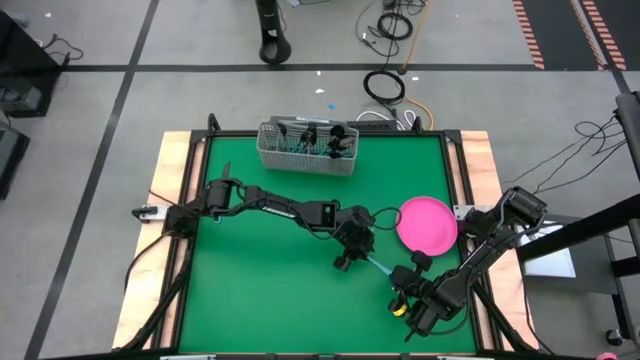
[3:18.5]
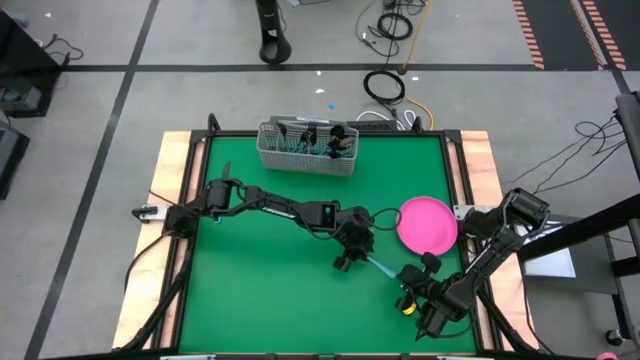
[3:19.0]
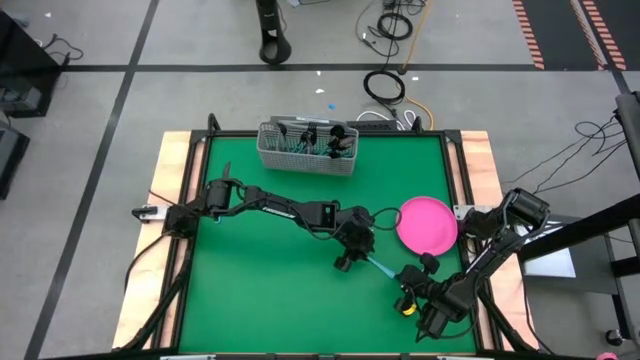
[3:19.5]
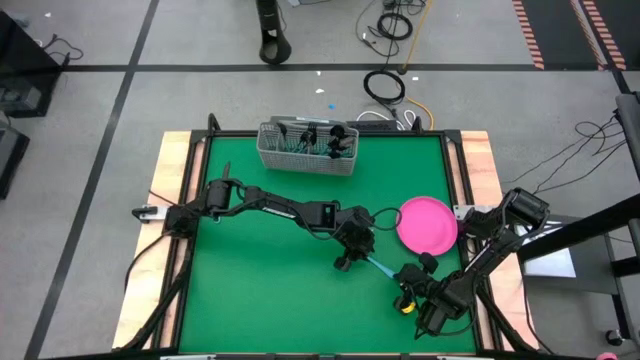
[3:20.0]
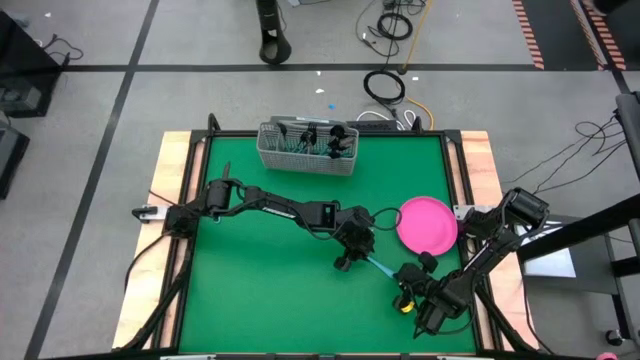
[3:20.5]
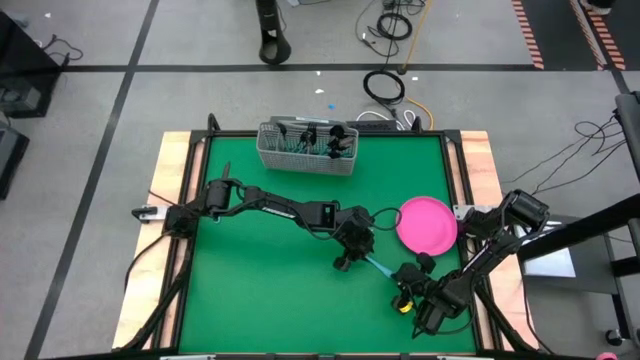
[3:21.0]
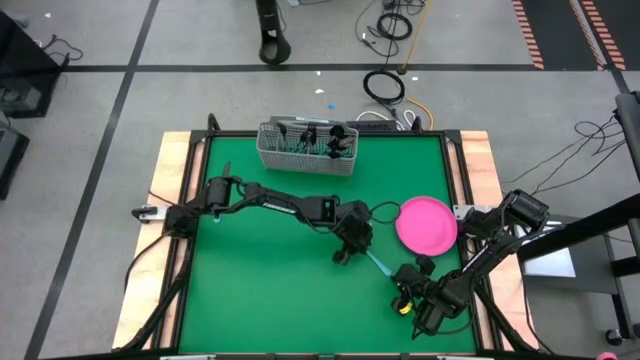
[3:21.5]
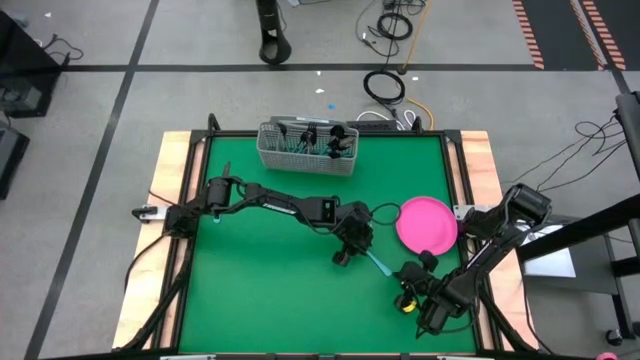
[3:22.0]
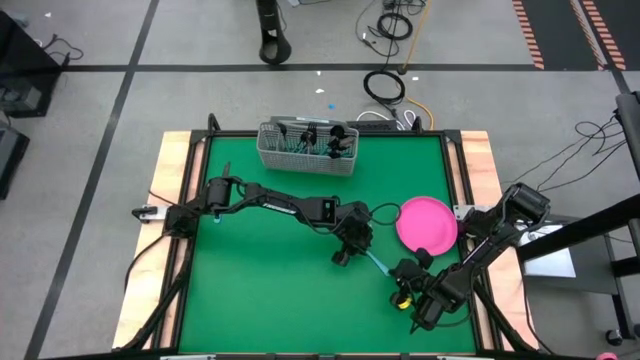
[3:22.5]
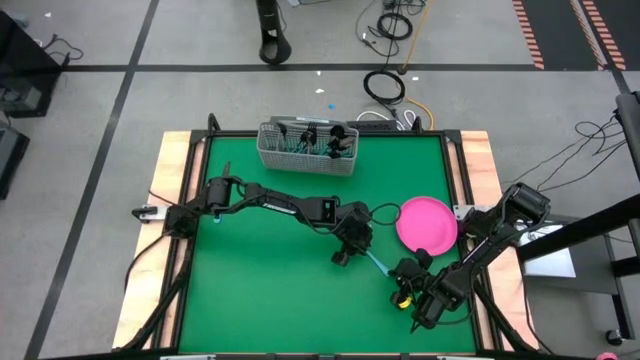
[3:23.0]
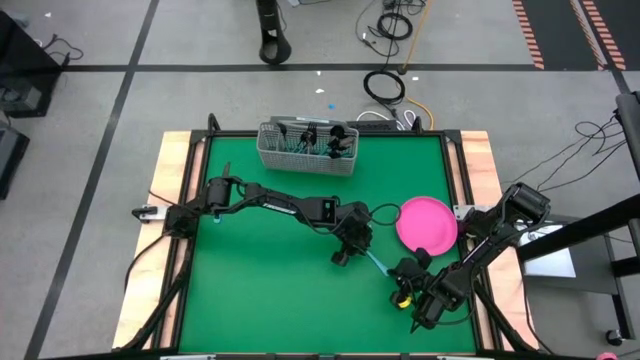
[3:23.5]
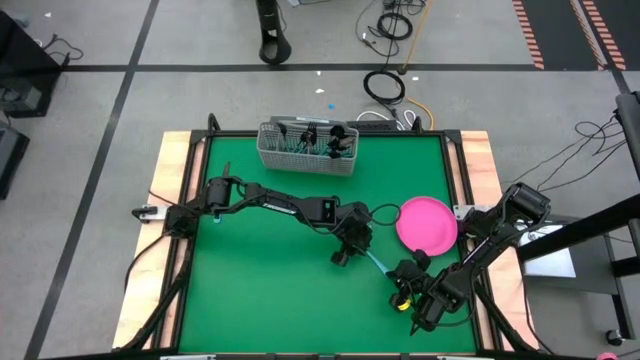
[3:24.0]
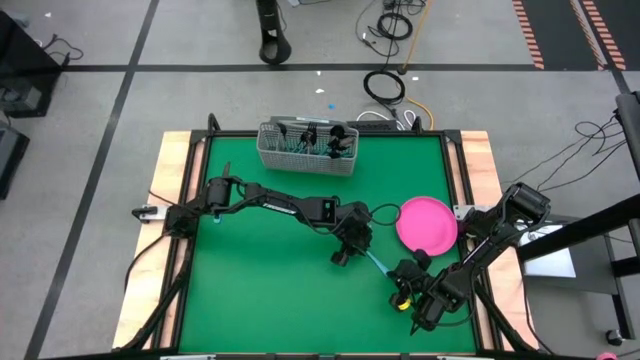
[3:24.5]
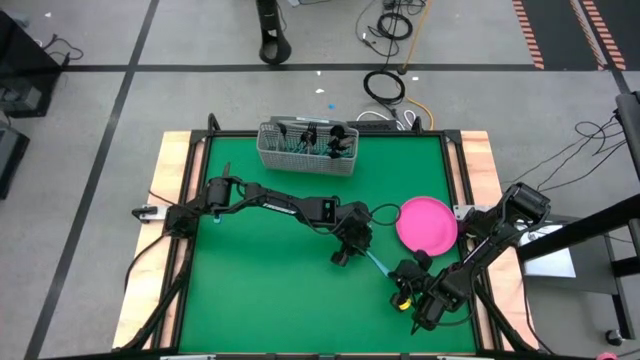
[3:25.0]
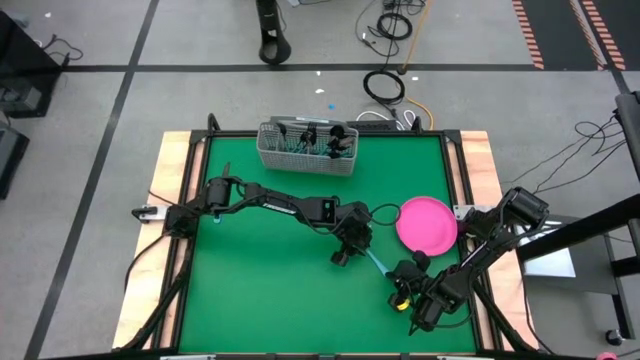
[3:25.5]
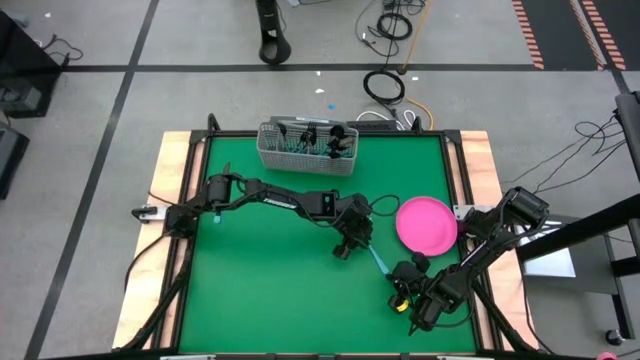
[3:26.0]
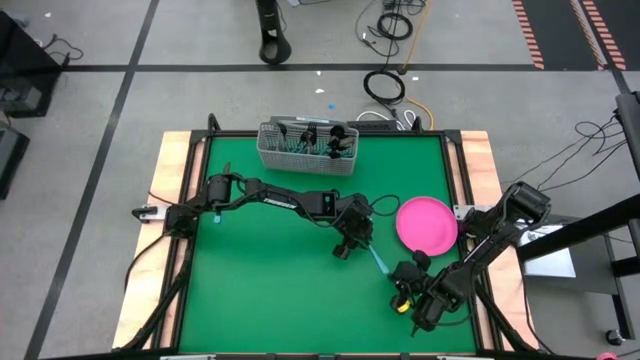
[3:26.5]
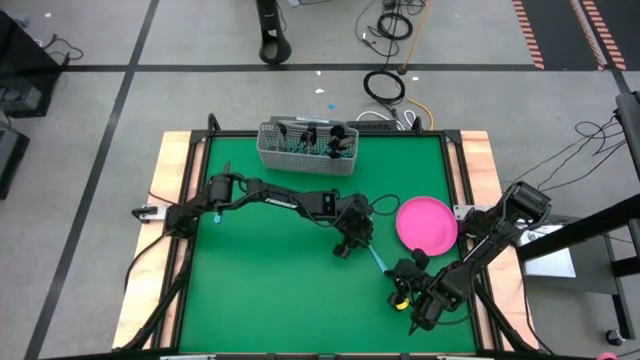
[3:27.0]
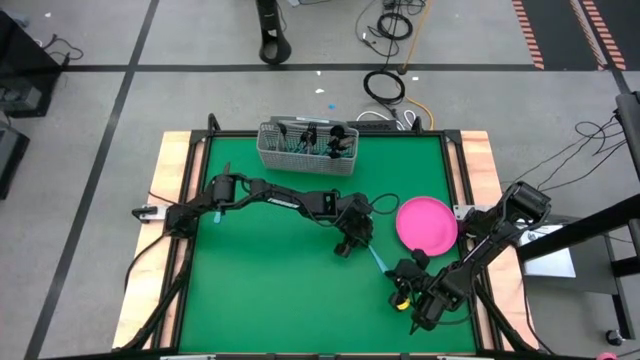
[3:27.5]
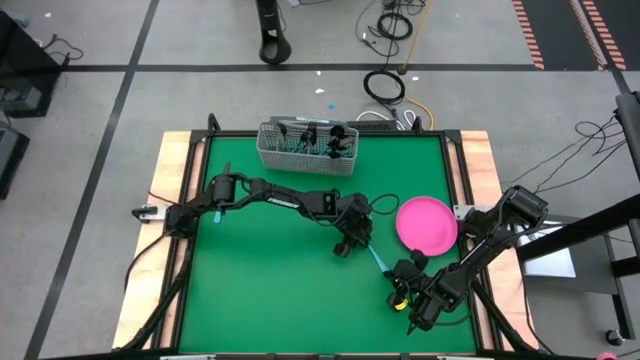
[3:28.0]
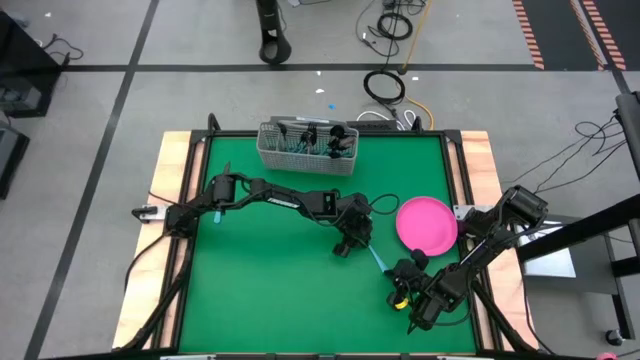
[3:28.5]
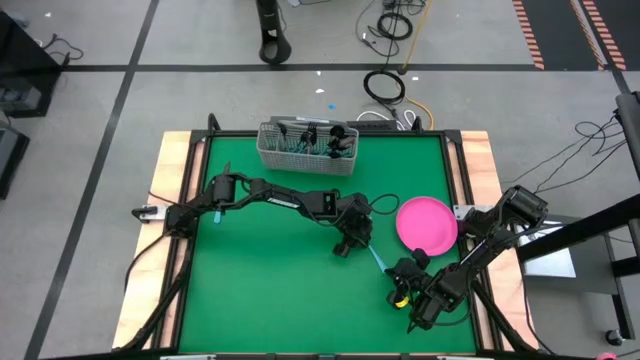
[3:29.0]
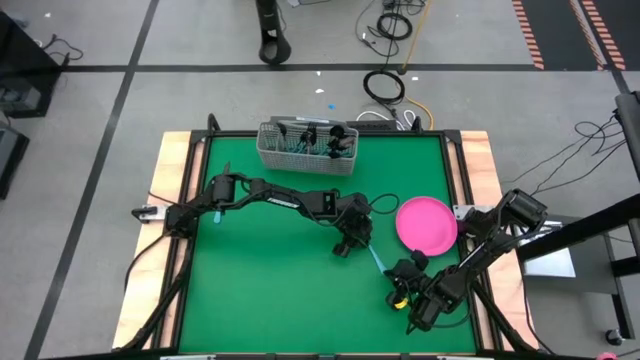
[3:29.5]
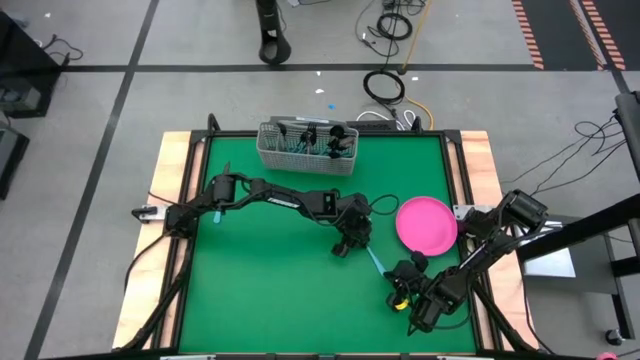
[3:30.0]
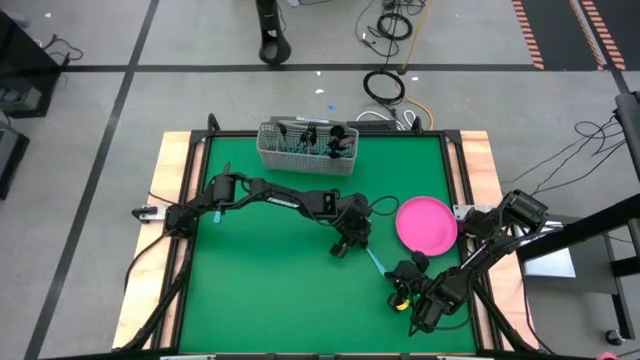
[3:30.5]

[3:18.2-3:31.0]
Task: Sort silverware
Put the blue table knife into the silverware tray with the other blue table knives

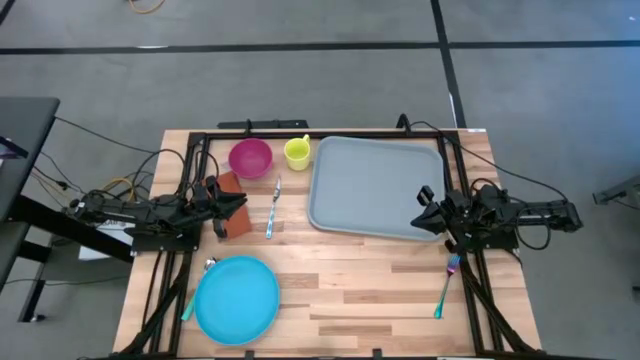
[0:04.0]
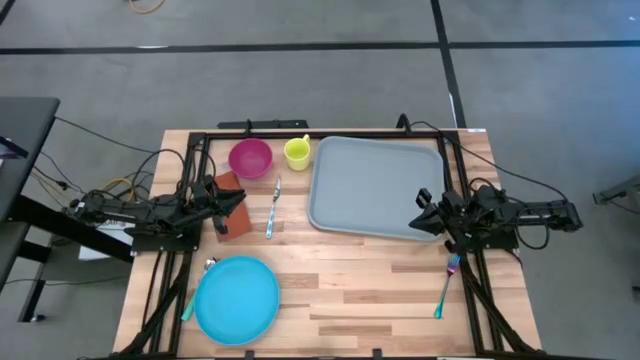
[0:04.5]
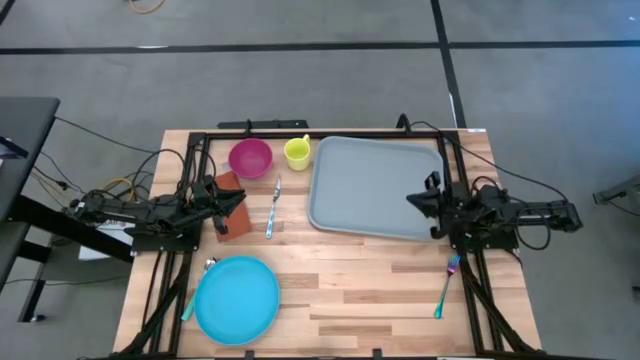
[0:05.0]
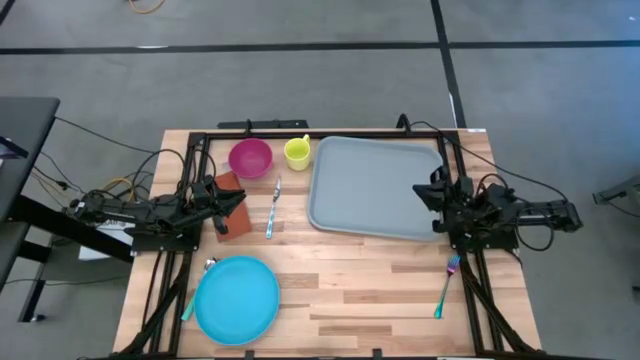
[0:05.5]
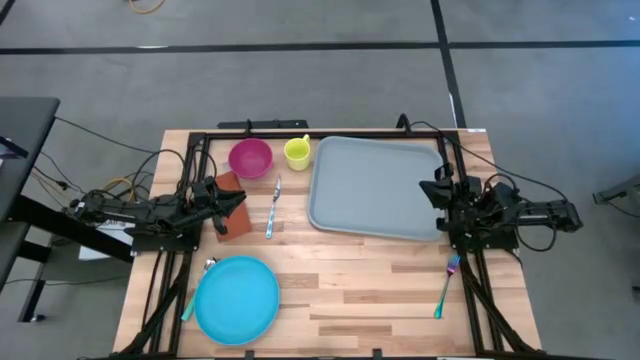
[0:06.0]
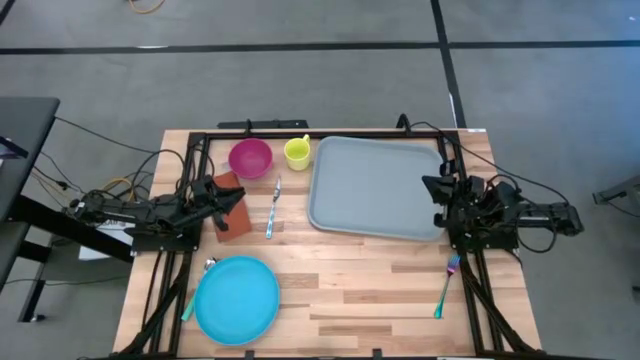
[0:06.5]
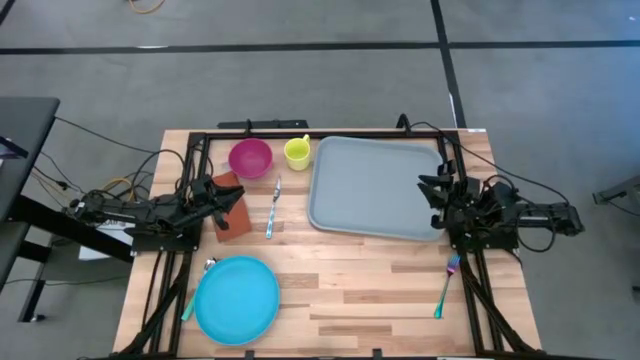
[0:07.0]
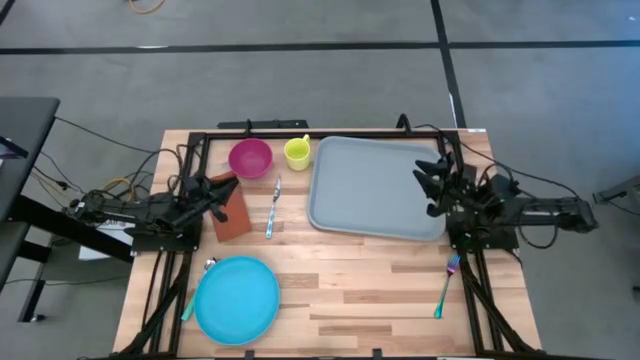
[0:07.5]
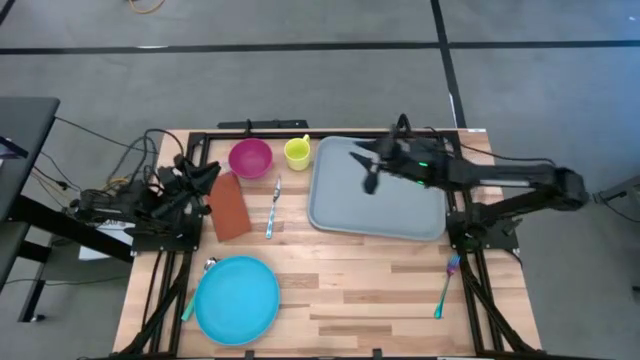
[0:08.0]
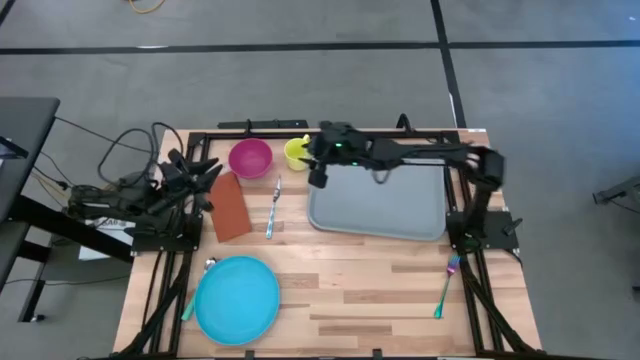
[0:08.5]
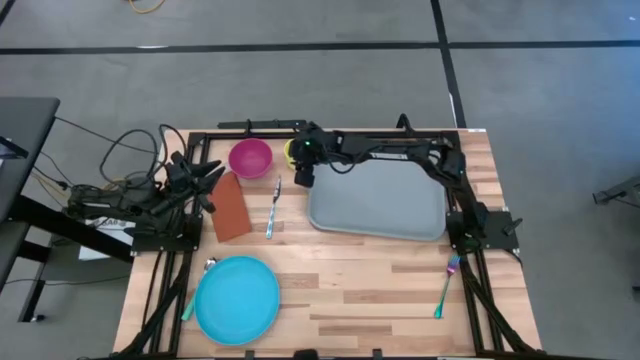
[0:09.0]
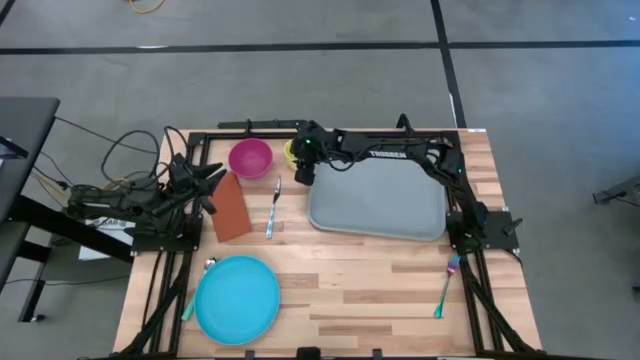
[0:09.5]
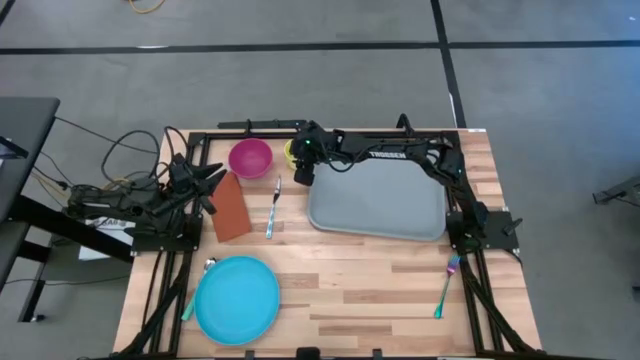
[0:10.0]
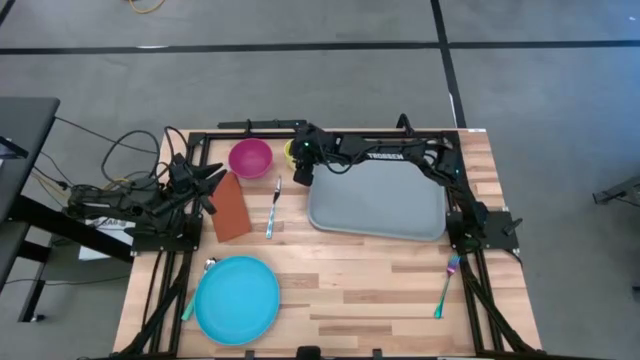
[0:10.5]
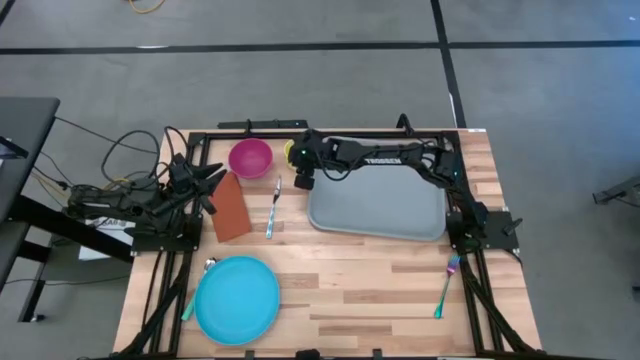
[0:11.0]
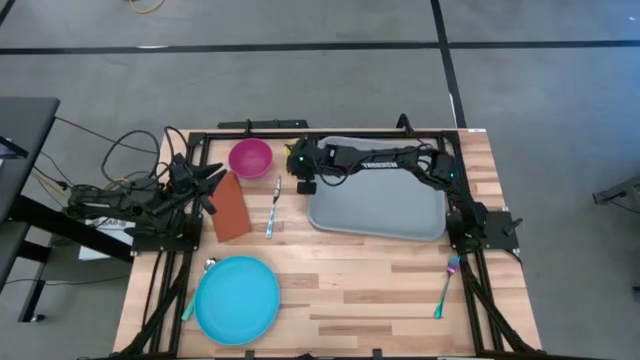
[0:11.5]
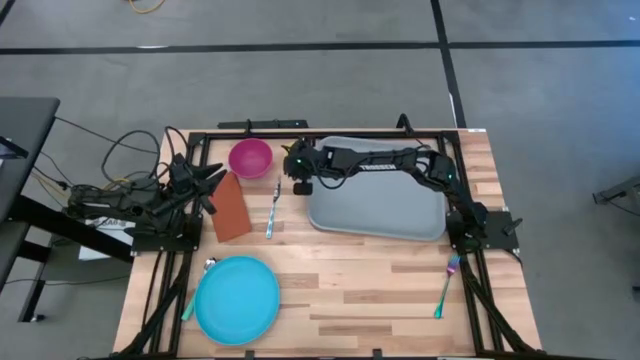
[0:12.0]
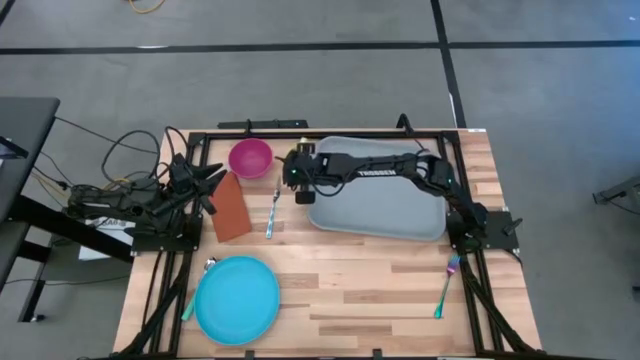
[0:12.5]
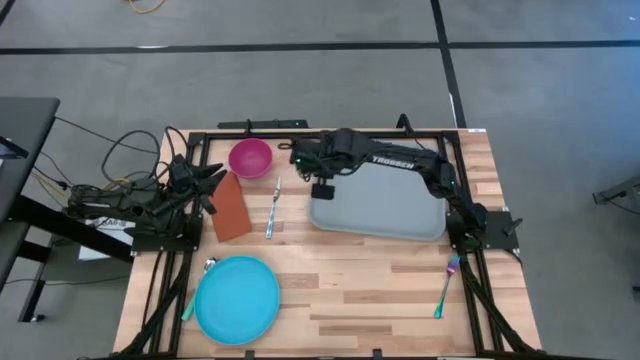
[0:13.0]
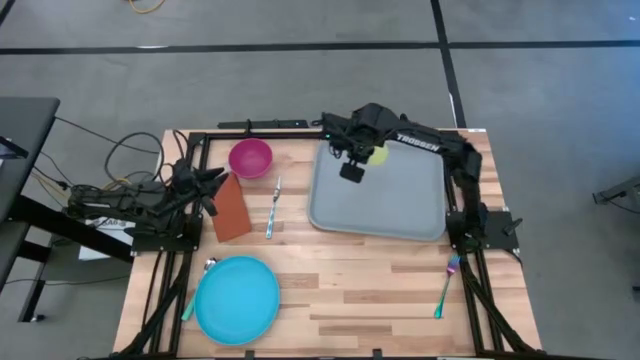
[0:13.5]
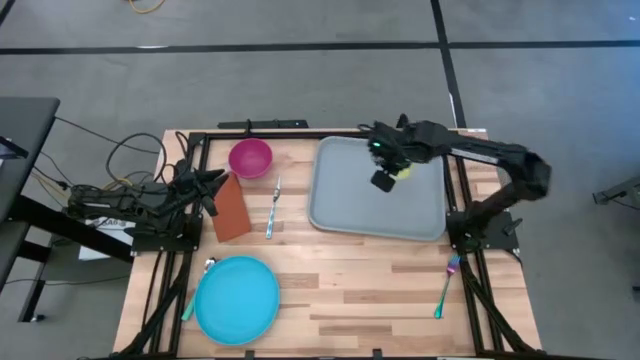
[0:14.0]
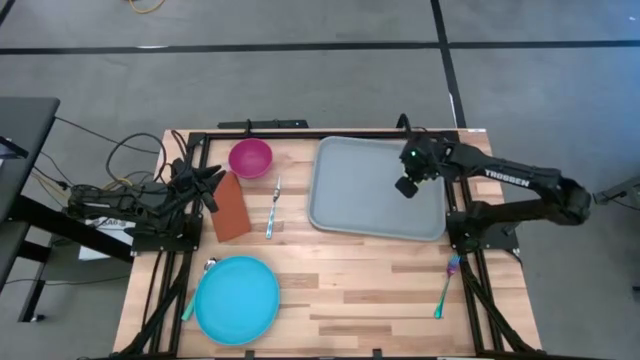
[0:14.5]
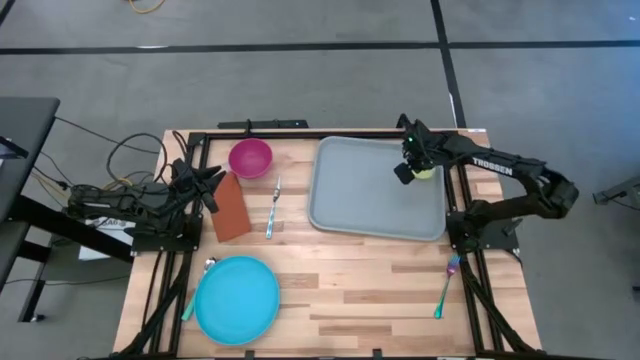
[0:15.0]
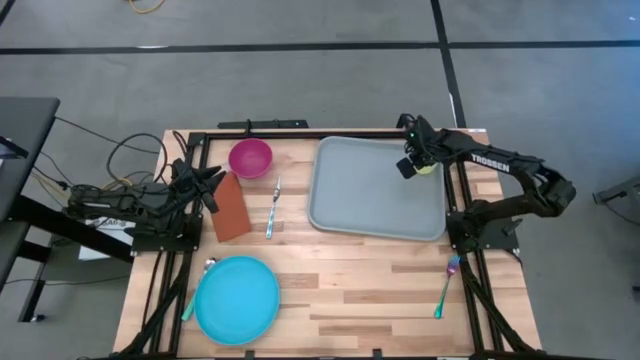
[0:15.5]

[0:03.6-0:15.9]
Task: Set up tray
Put the yellow mug on the top right of the gray tray
